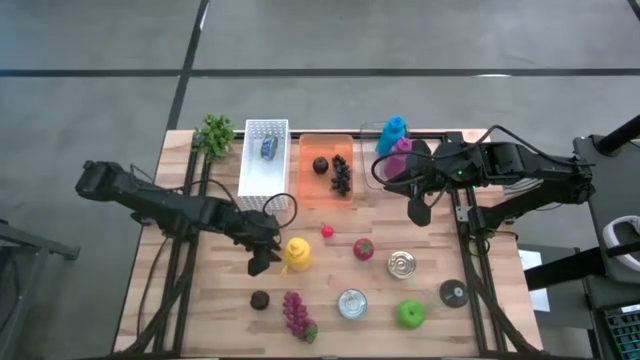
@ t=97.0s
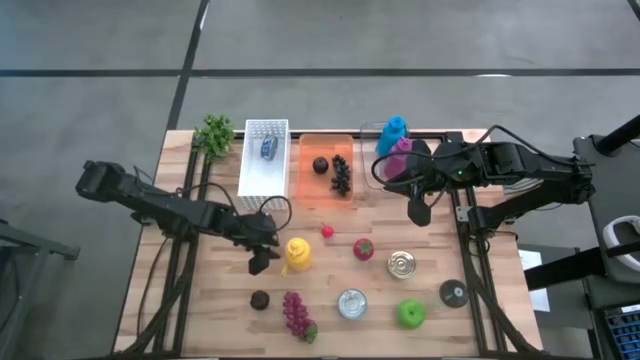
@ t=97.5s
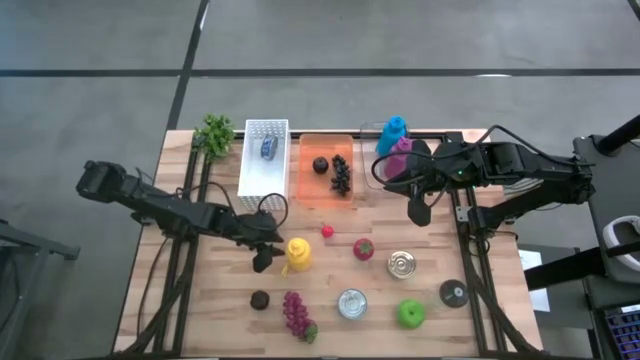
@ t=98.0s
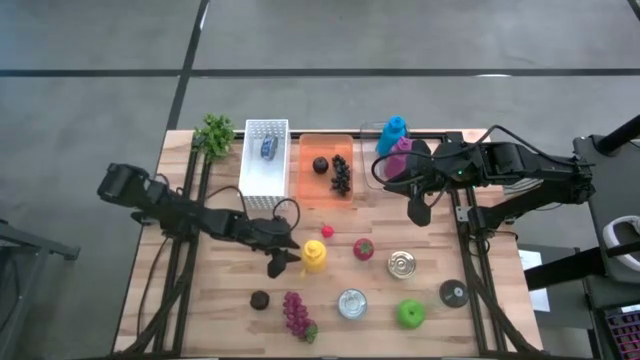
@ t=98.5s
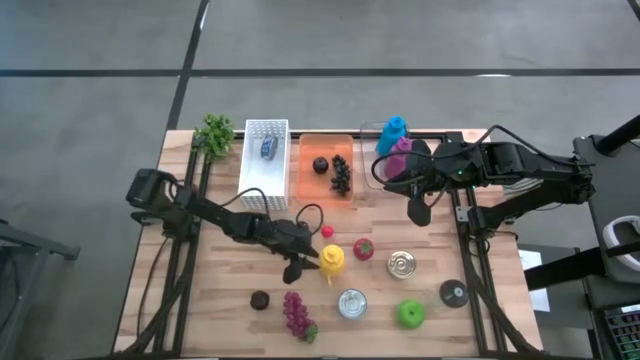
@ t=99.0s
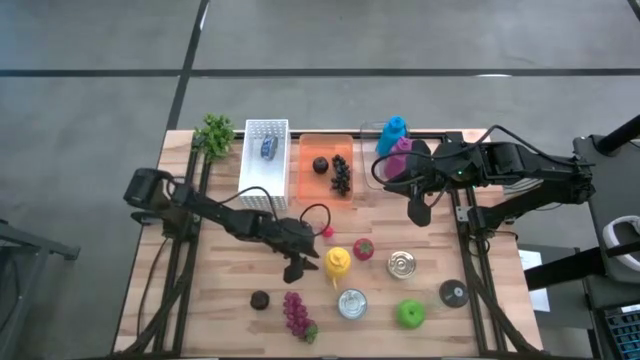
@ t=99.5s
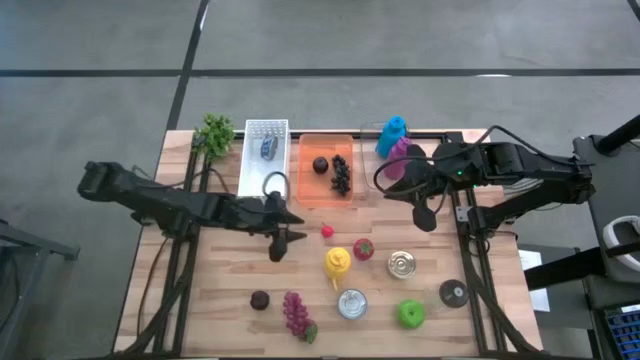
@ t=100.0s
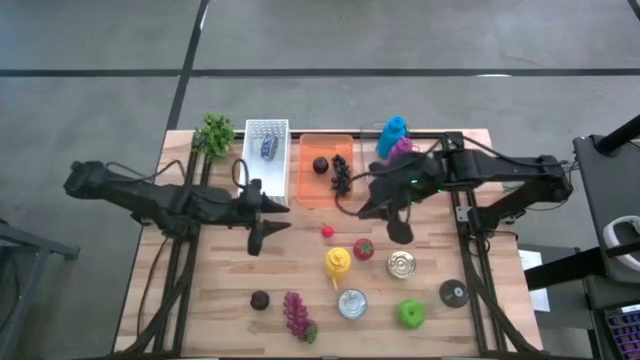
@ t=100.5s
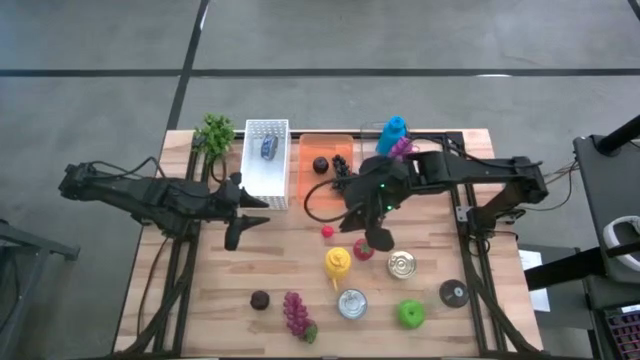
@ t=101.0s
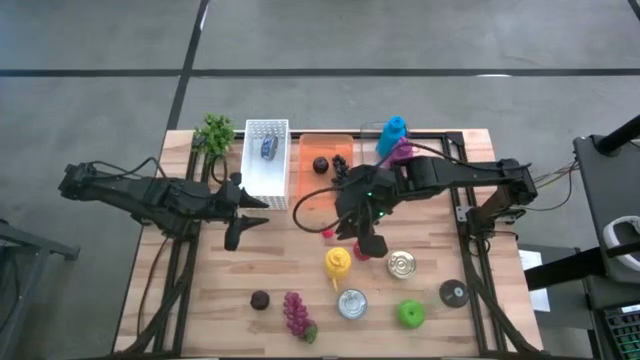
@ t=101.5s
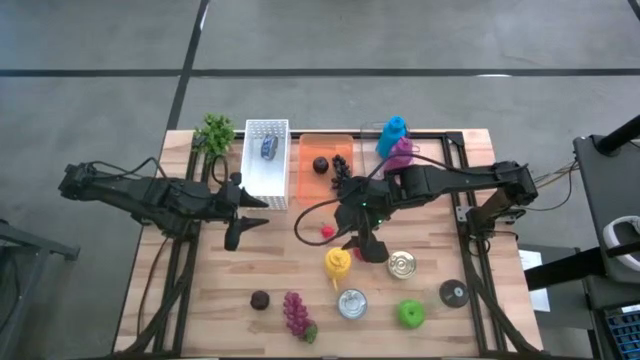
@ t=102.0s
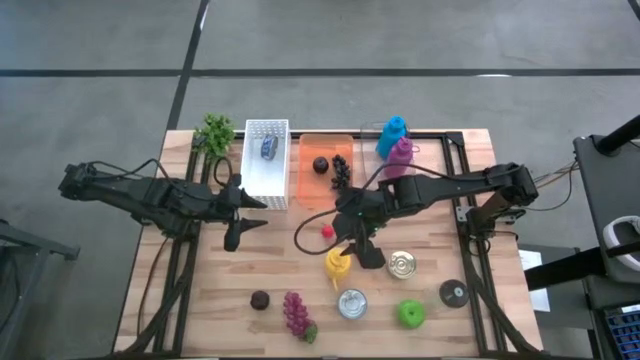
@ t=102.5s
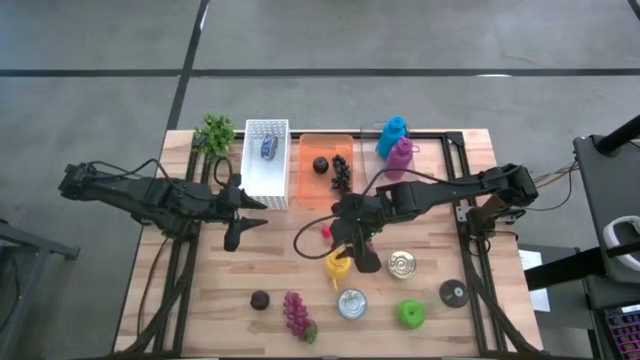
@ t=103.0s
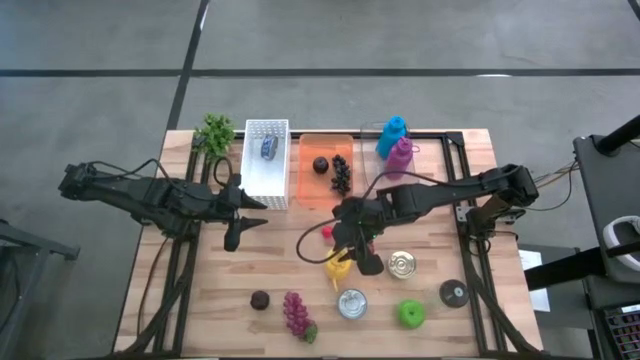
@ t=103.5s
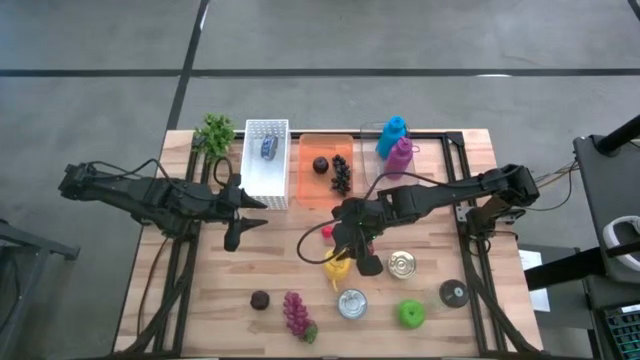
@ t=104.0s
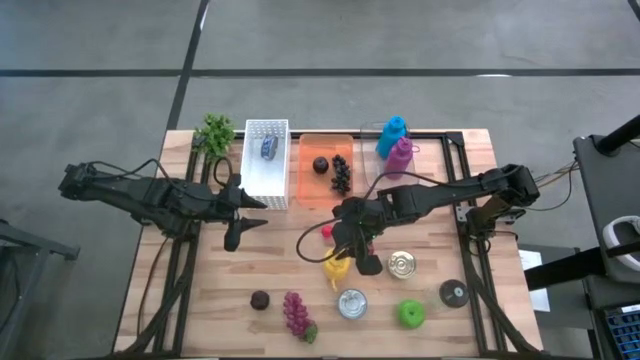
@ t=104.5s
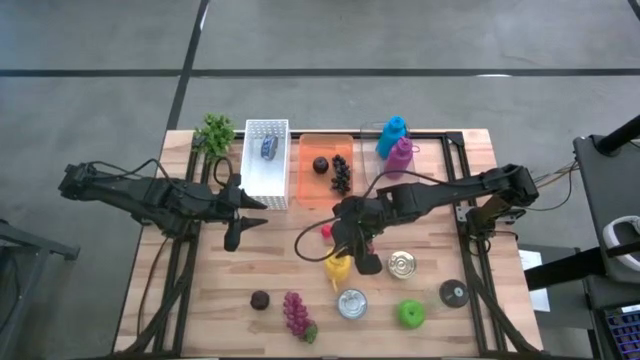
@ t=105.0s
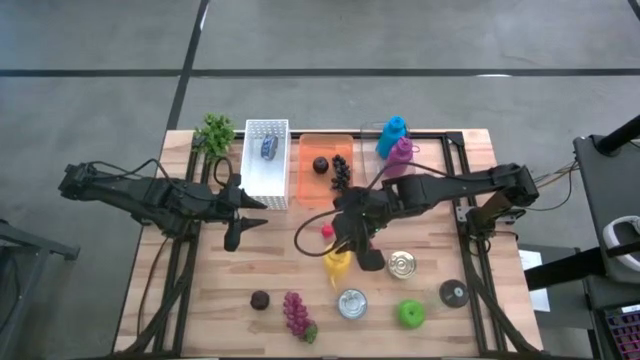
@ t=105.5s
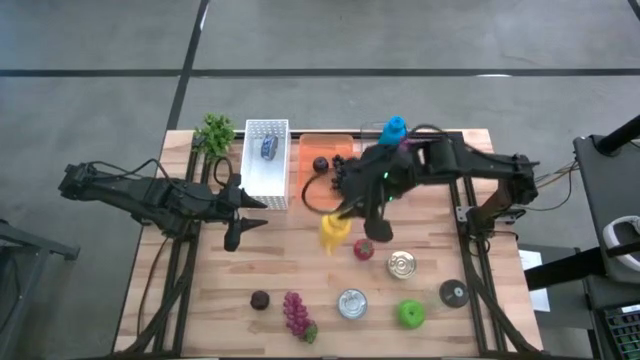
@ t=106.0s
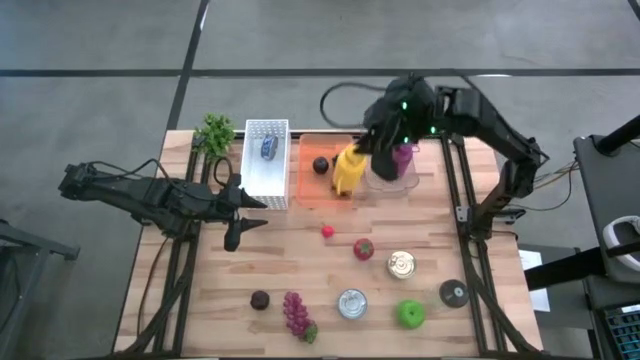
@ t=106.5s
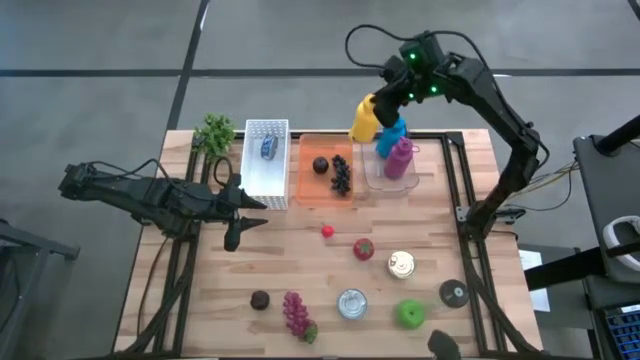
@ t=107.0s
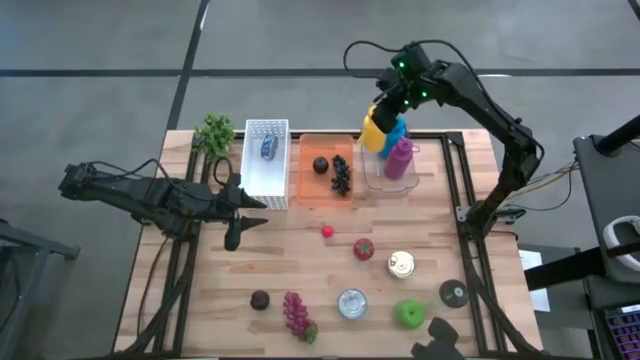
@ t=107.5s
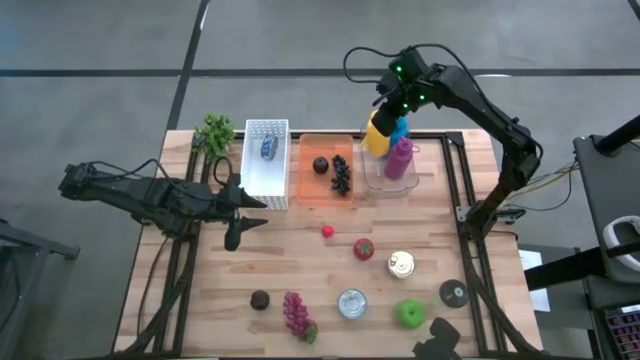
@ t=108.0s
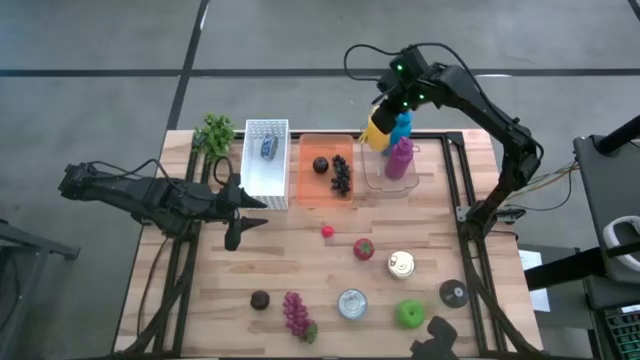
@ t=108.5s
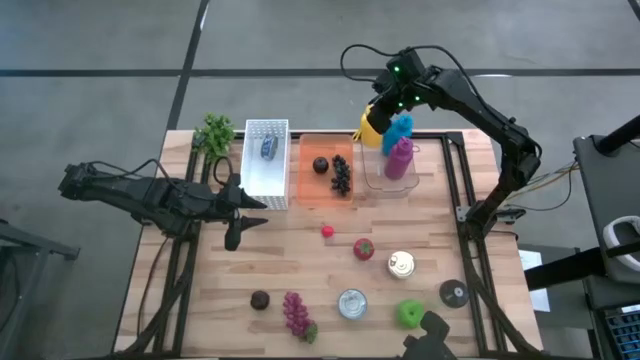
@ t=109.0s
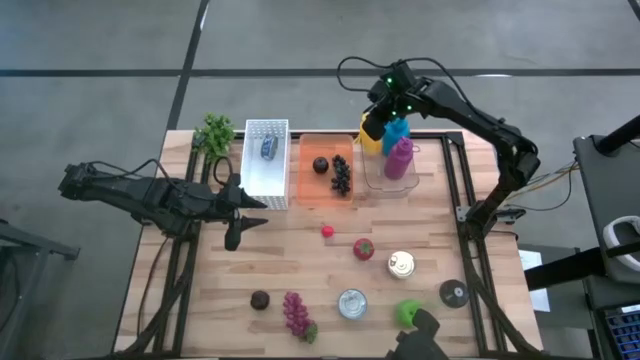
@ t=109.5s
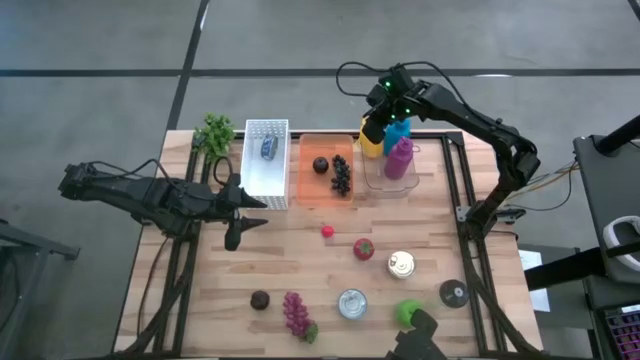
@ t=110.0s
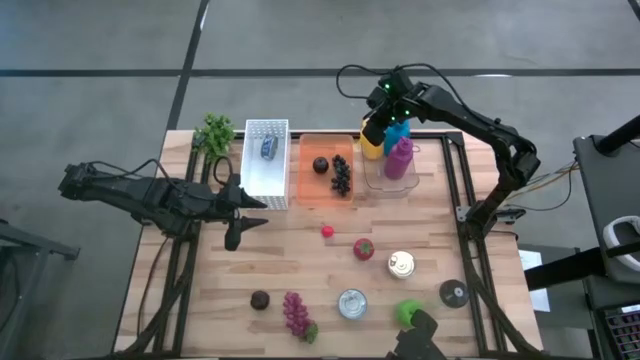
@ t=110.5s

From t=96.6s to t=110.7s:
Task: Pick & Place Food Item
Put the yellow tumbler into the transparent bin

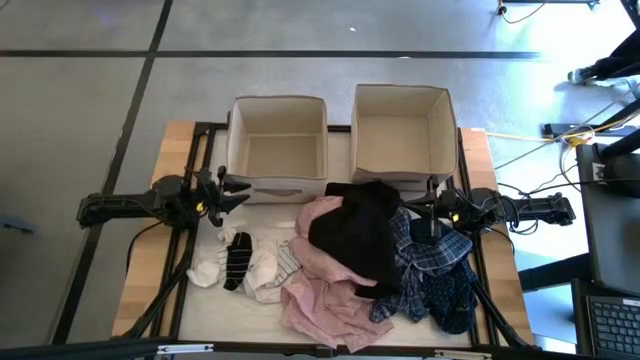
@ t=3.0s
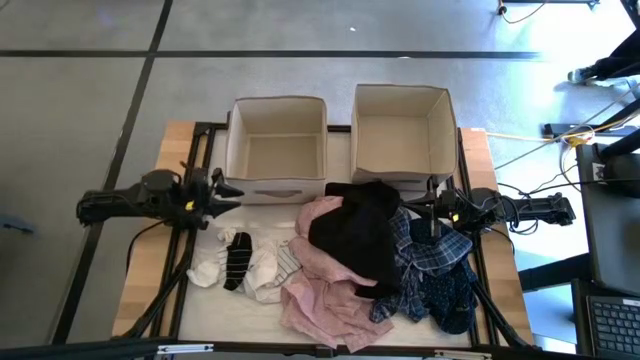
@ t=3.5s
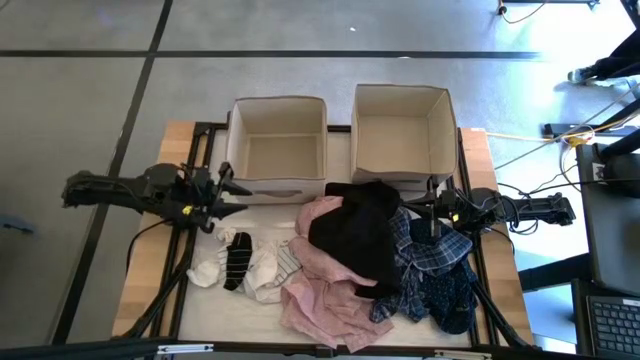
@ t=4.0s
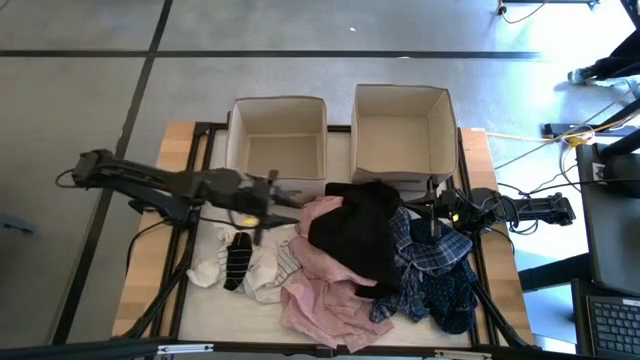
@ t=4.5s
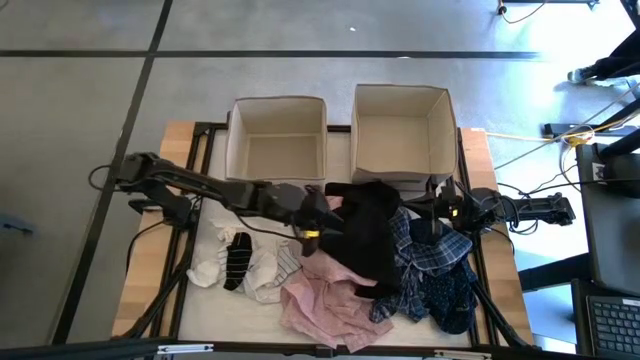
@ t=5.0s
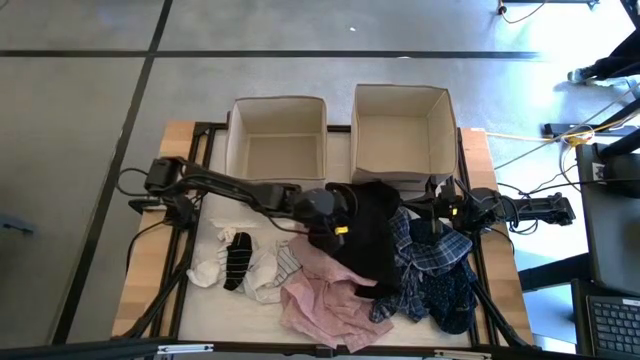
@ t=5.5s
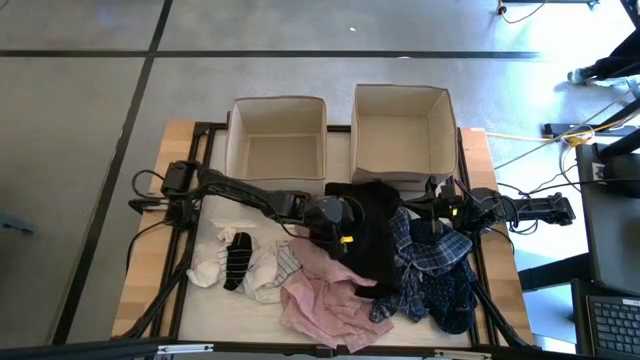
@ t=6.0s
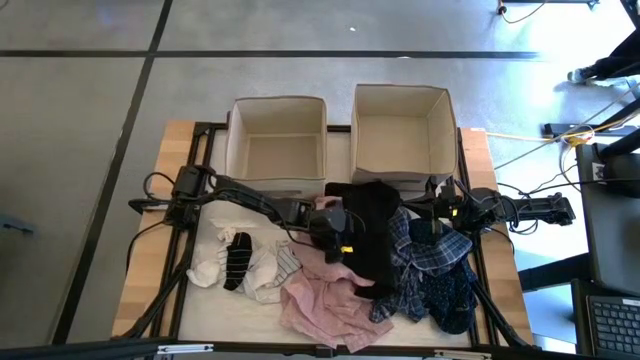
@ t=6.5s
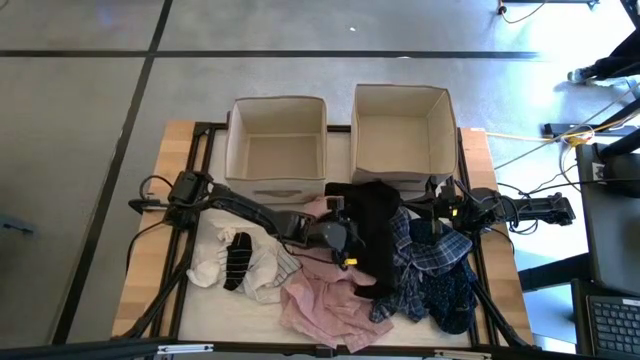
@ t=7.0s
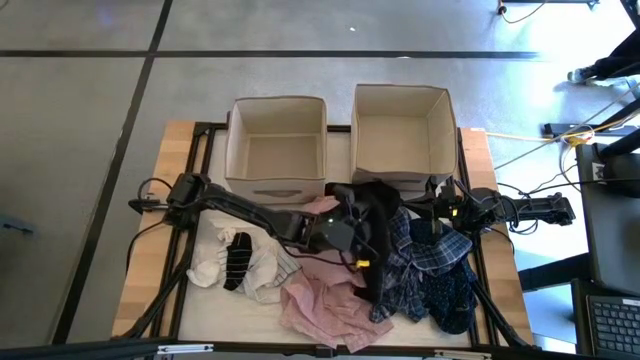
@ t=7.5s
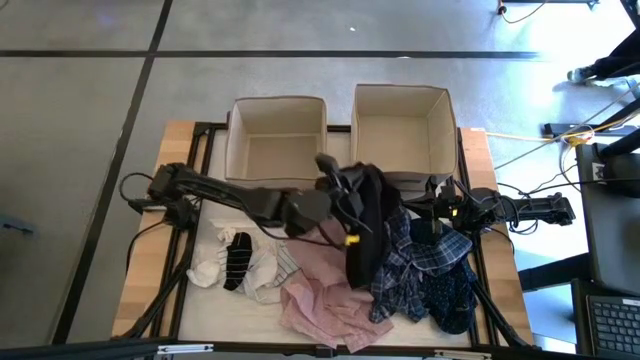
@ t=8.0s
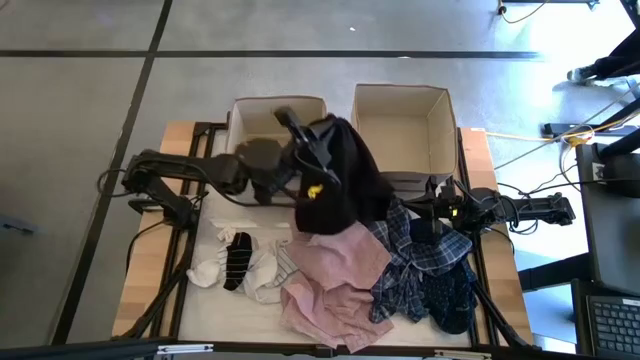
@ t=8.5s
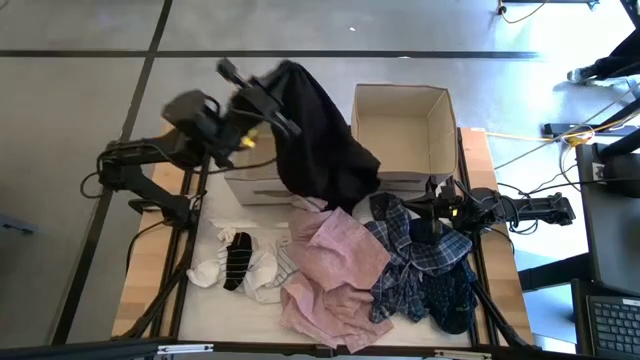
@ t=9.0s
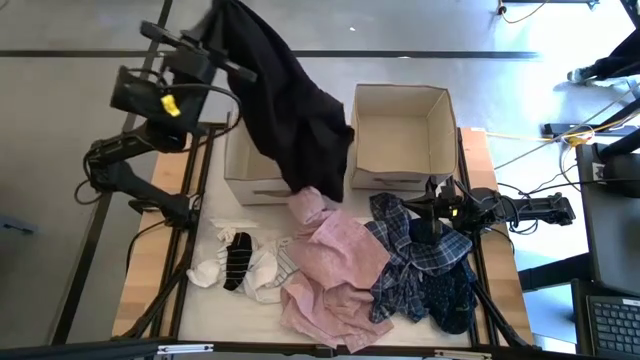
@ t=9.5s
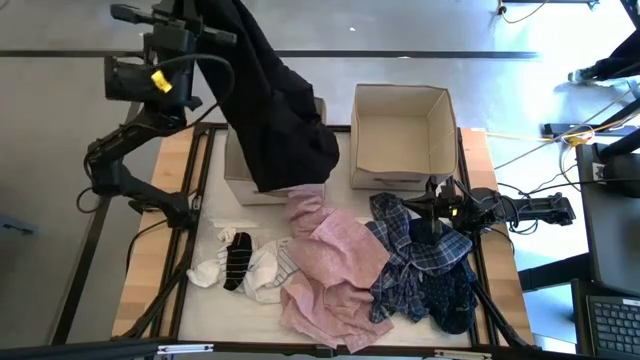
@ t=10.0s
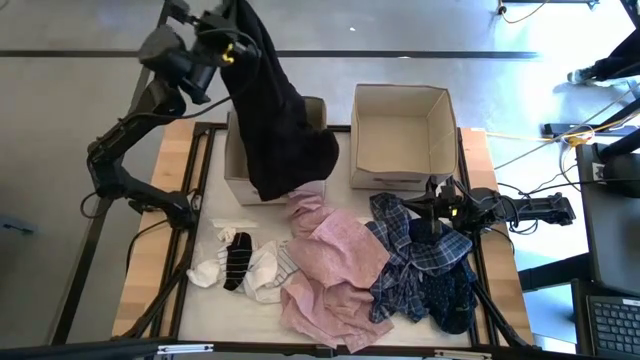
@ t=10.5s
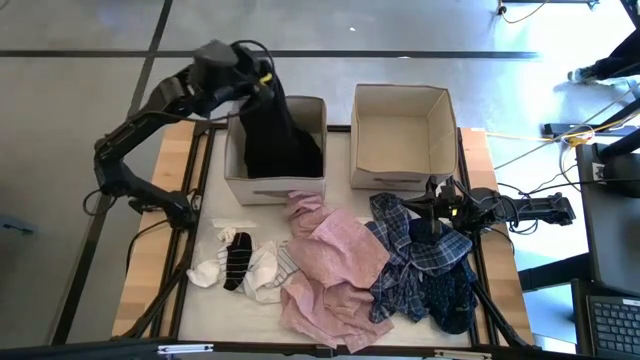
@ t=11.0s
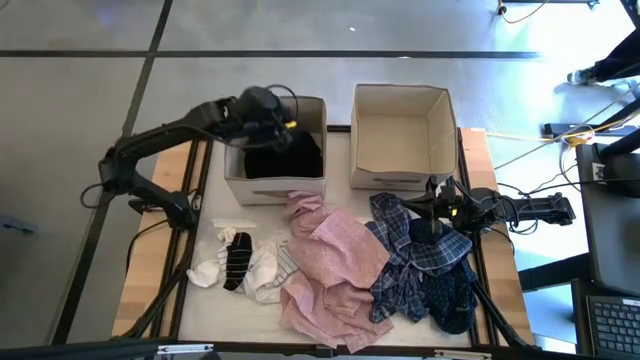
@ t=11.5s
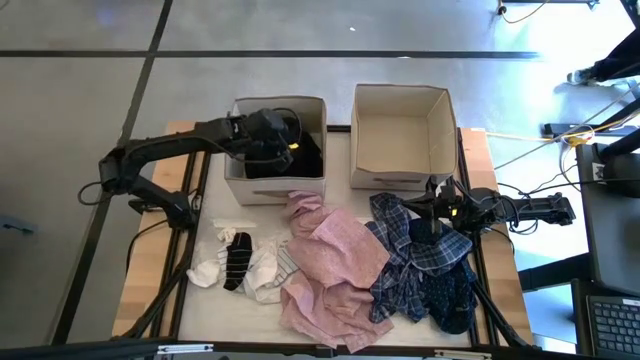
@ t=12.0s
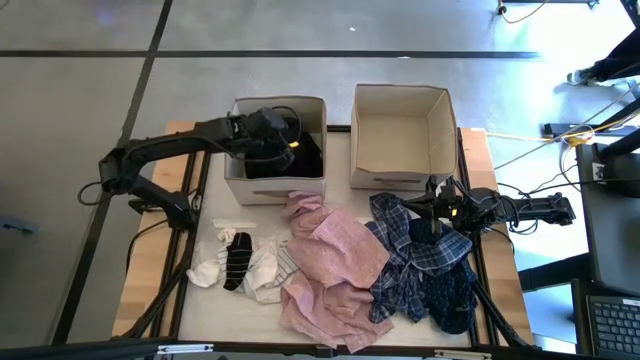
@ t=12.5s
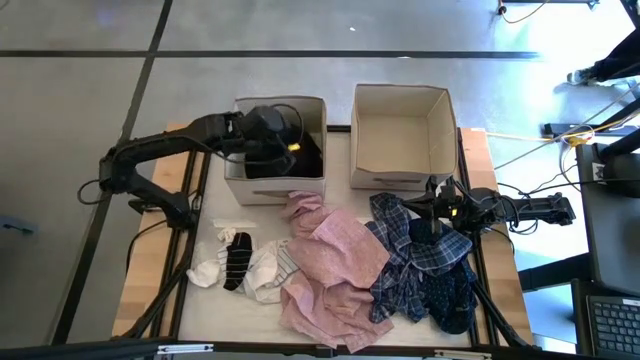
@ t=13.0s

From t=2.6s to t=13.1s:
Task: Sort clothes
Put the black coat into the left laundry organizer
